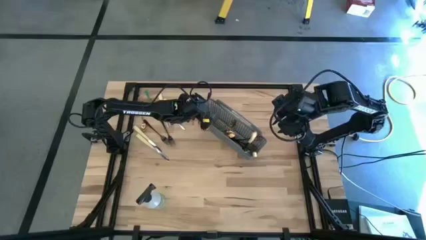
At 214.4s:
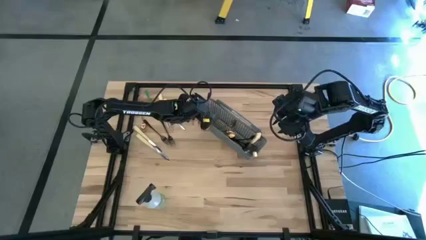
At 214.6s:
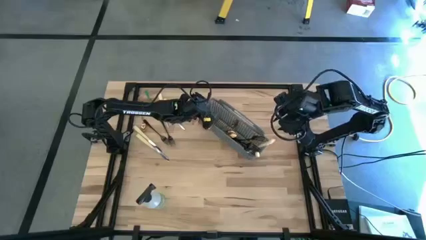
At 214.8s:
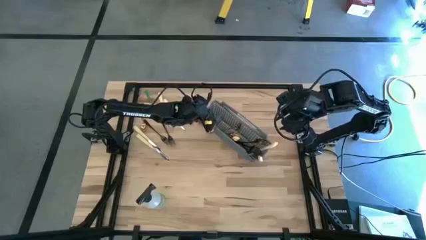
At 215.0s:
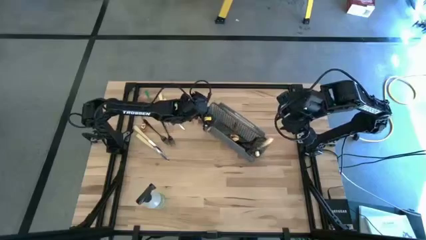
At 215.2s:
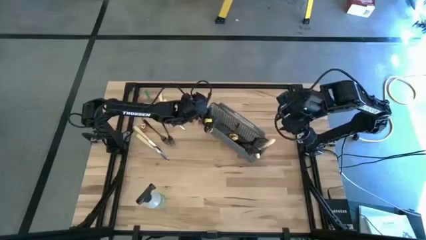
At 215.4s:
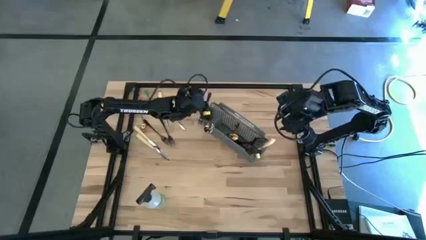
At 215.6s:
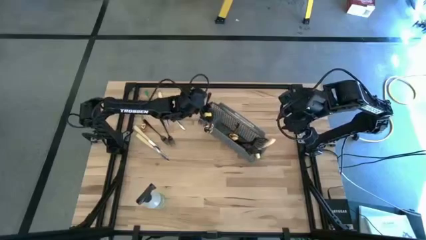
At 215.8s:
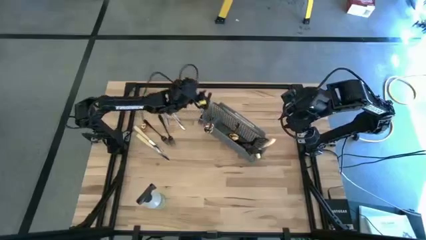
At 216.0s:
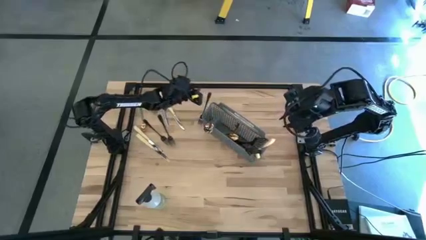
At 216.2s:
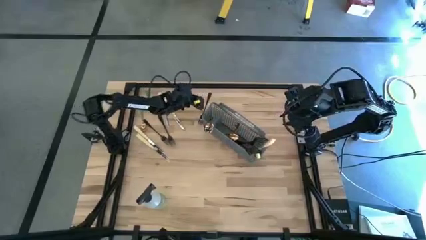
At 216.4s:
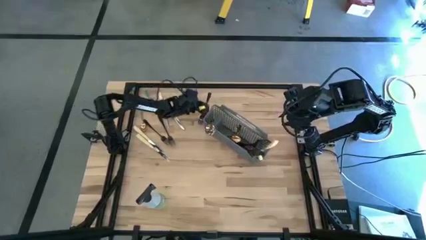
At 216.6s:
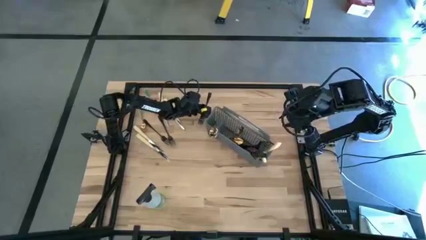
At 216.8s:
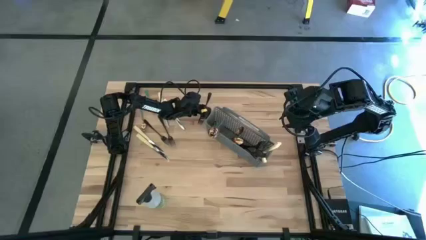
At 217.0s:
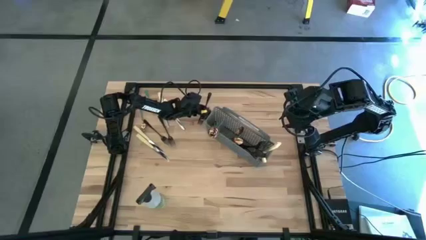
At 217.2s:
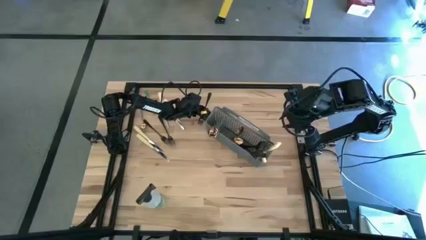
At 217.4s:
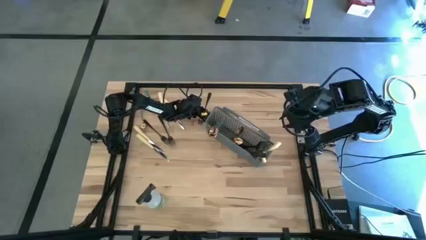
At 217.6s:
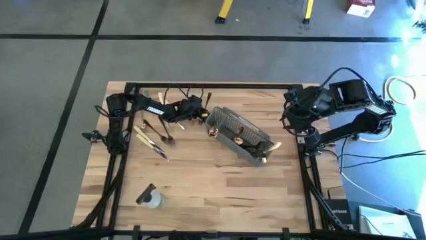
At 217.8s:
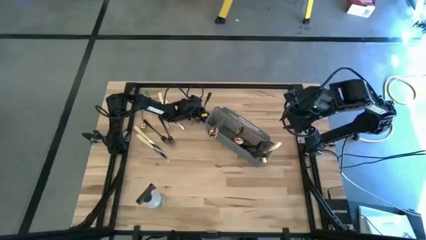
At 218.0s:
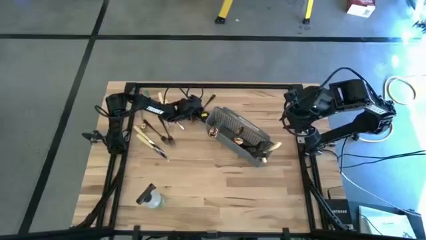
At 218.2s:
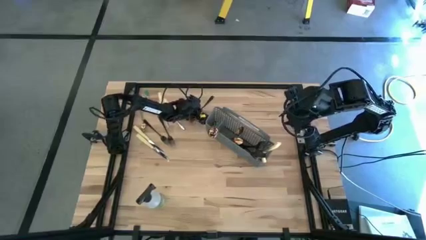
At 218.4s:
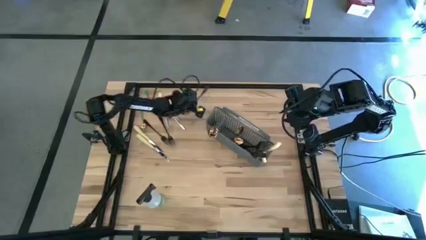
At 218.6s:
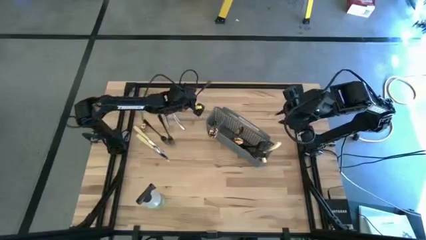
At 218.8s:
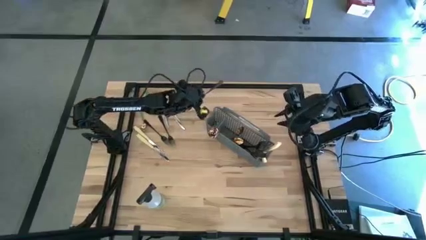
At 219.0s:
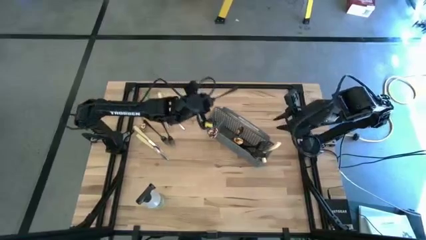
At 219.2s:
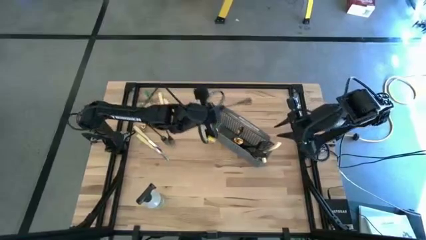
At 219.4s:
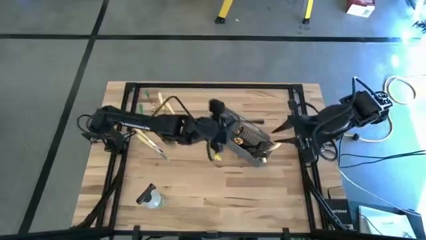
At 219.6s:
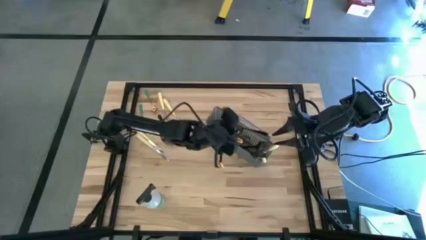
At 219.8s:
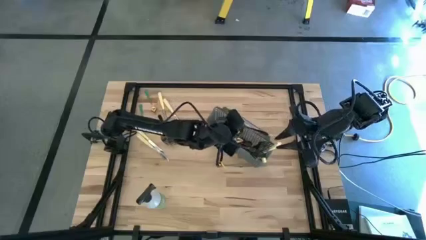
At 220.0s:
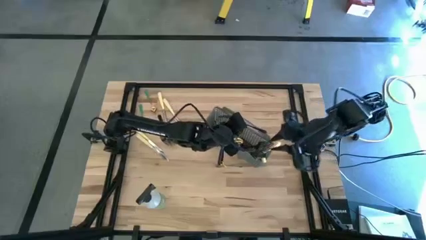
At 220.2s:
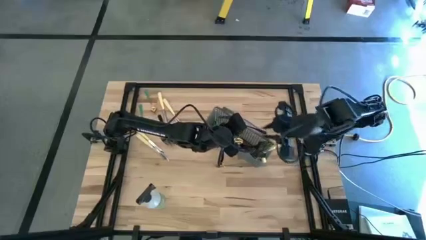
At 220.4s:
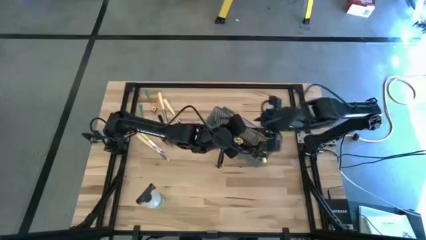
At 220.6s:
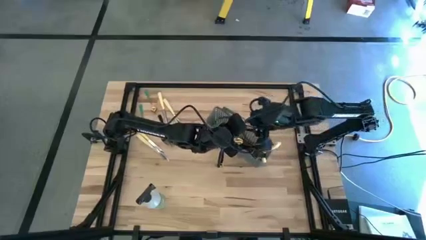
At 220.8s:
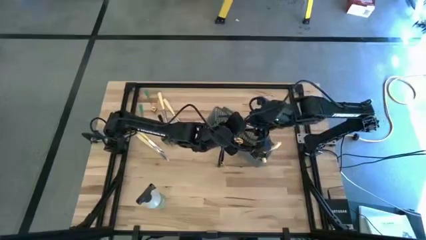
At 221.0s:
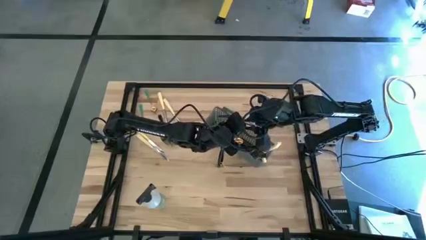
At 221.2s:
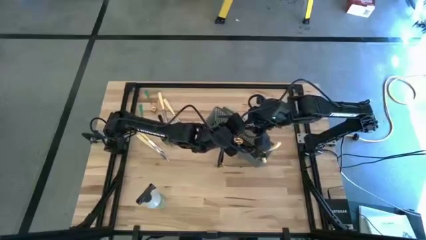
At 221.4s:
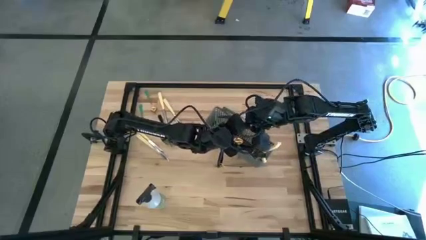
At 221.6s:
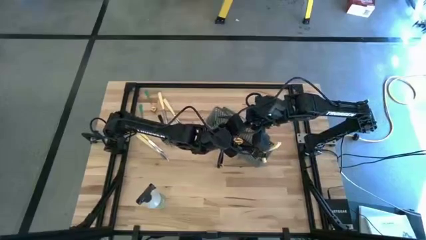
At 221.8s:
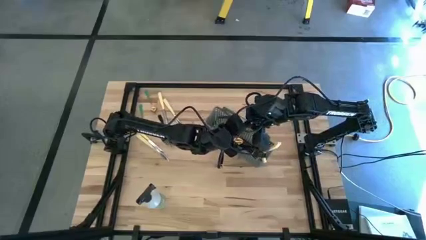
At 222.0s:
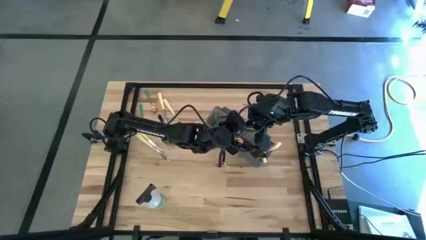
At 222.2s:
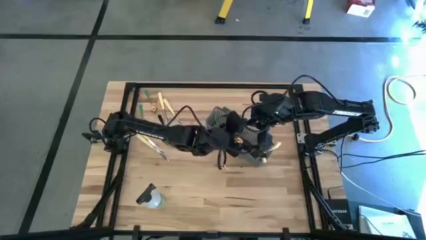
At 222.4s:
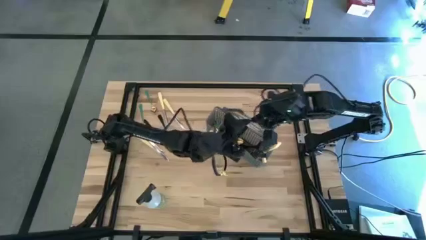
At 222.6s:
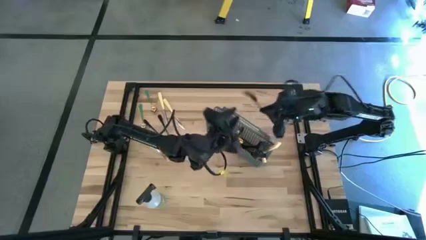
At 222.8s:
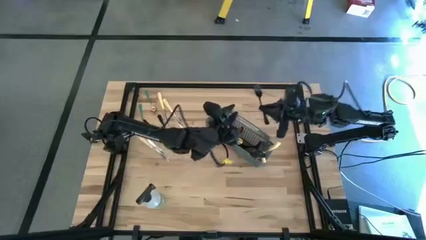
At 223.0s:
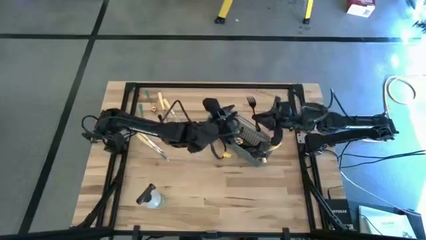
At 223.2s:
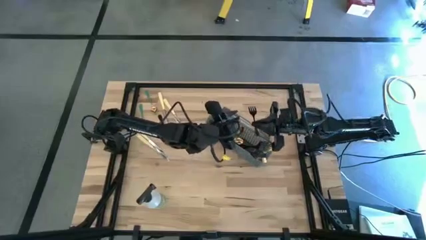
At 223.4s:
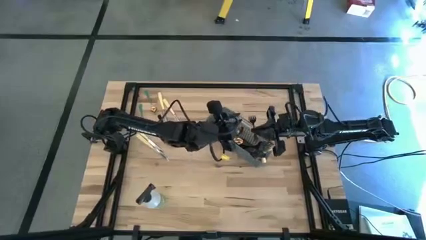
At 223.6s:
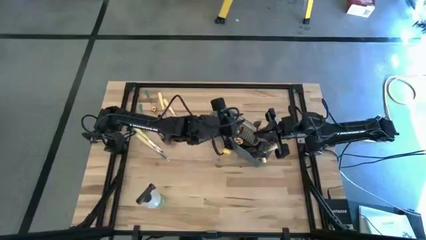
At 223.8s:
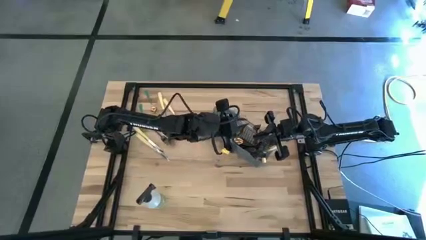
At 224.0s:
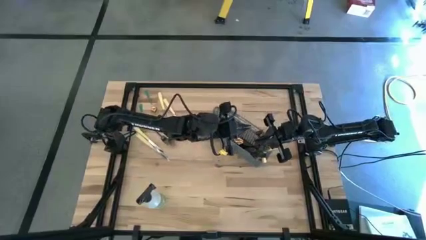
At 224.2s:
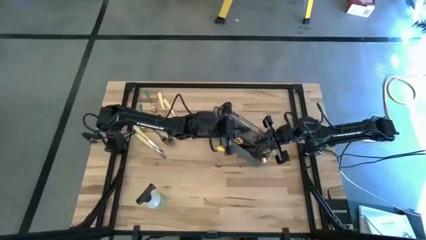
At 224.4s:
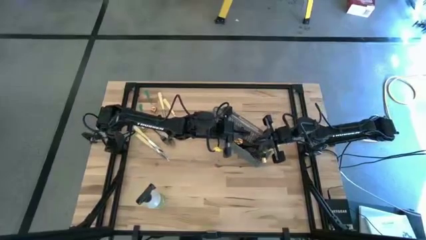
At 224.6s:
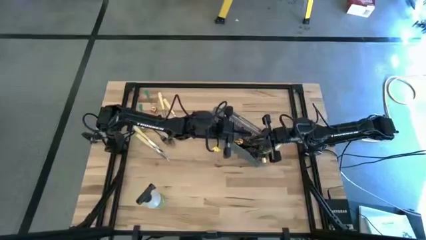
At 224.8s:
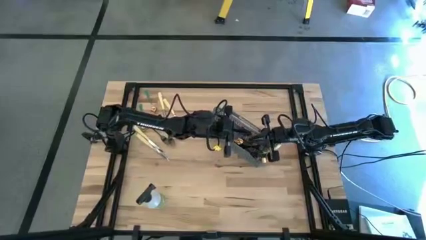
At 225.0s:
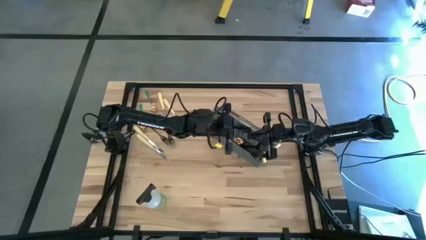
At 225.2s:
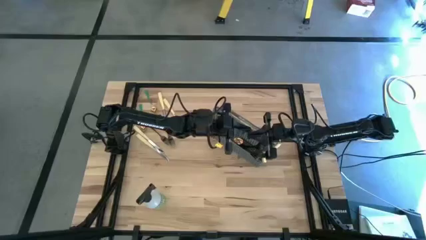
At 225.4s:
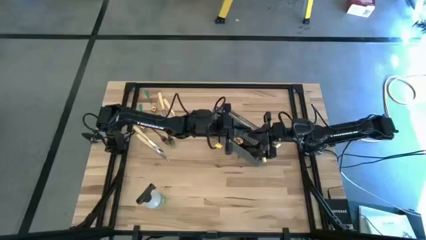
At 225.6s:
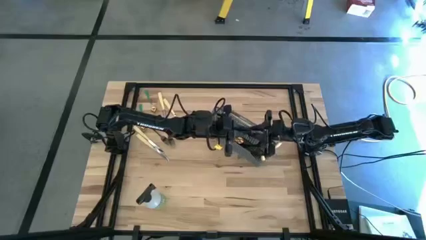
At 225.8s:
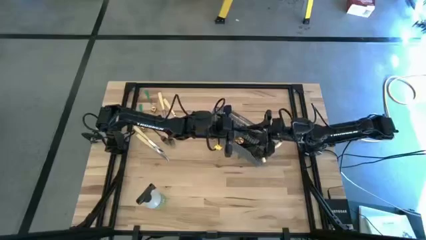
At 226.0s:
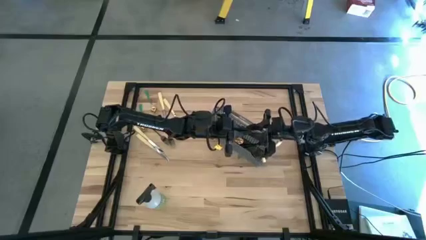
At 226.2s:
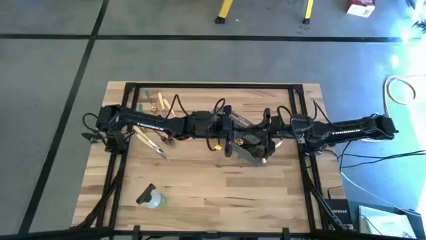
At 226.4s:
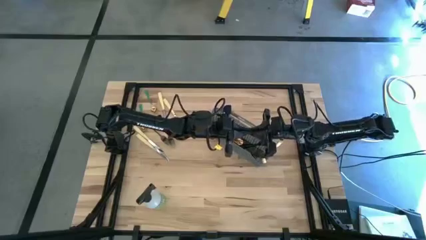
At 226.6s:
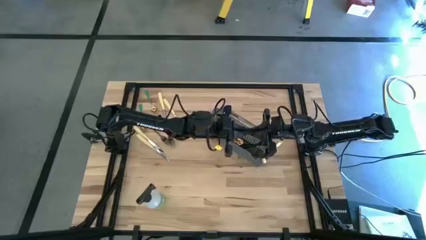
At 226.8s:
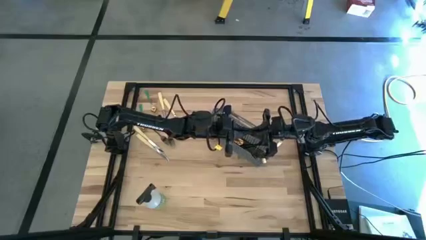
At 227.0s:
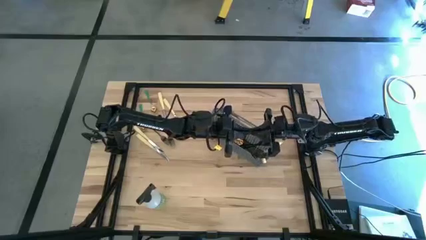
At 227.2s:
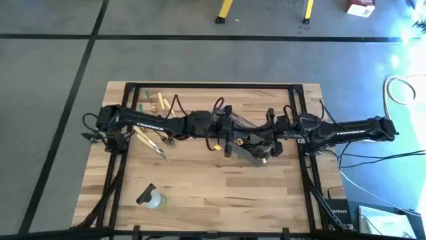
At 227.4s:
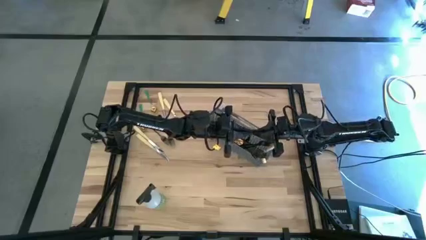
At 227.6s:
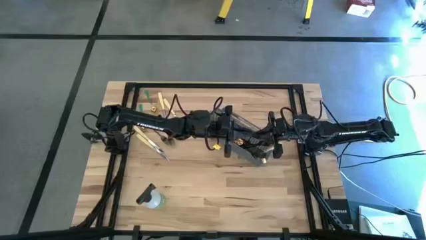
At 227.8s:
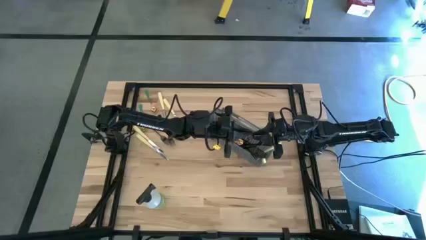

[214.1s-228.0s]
Task: Sort silverware
Put the black fork into the cutlery rack

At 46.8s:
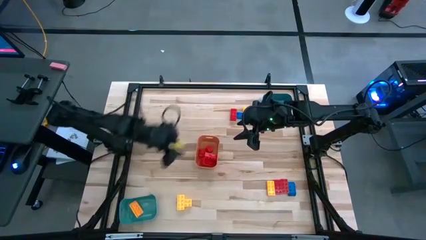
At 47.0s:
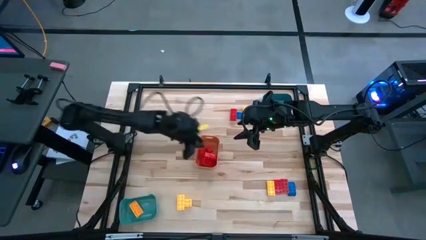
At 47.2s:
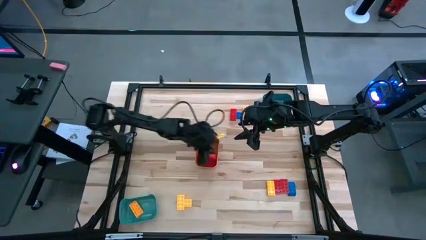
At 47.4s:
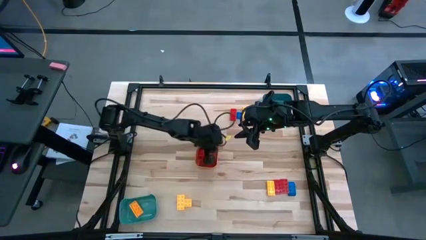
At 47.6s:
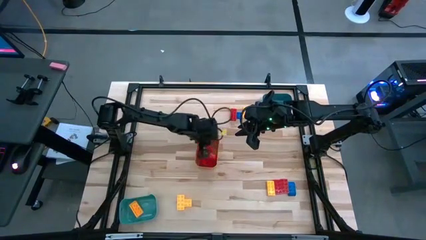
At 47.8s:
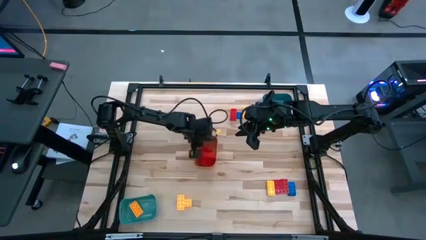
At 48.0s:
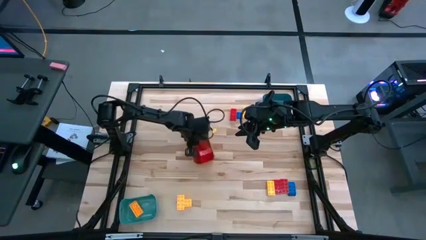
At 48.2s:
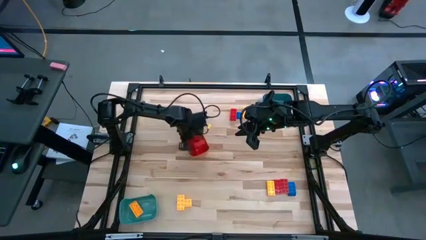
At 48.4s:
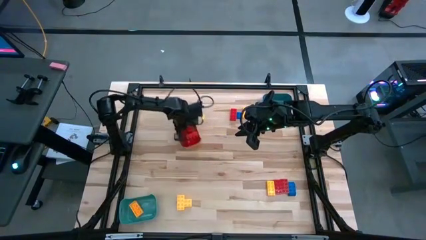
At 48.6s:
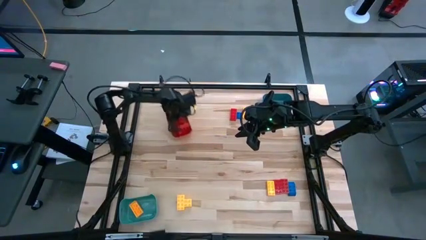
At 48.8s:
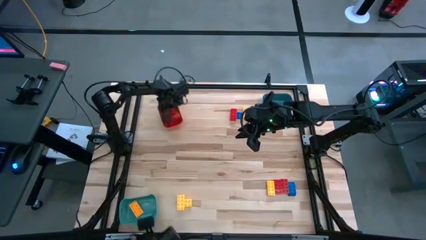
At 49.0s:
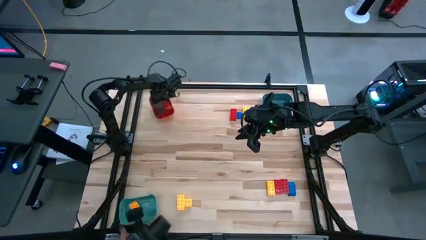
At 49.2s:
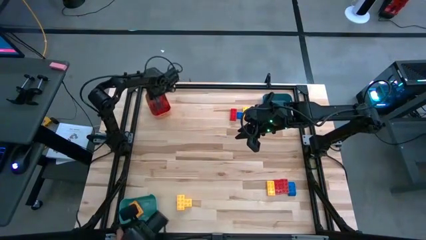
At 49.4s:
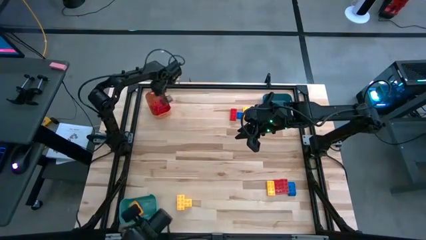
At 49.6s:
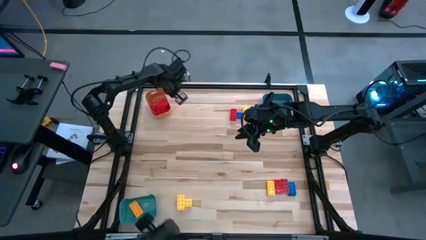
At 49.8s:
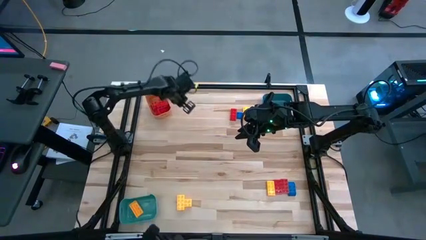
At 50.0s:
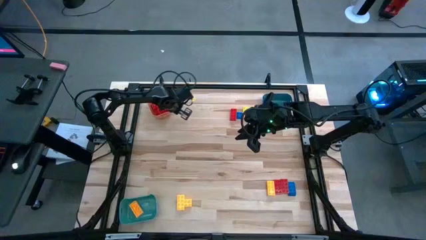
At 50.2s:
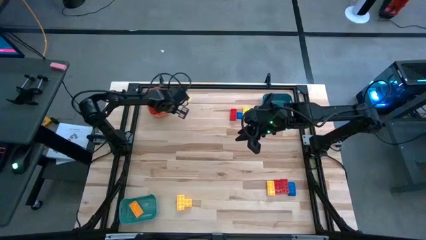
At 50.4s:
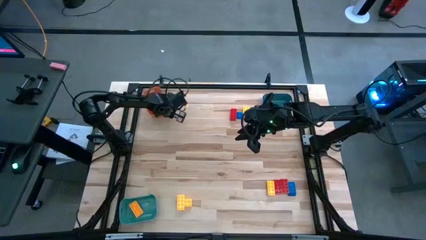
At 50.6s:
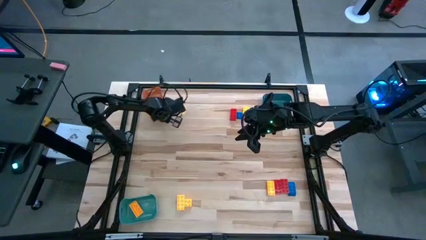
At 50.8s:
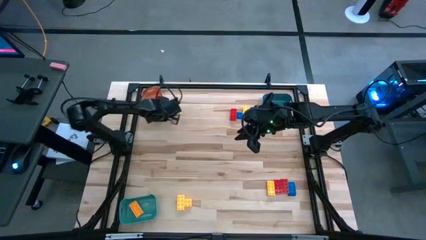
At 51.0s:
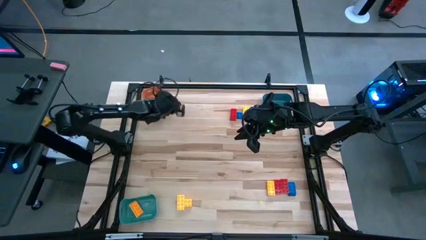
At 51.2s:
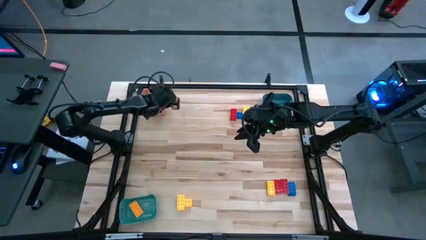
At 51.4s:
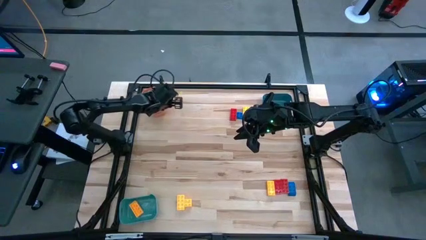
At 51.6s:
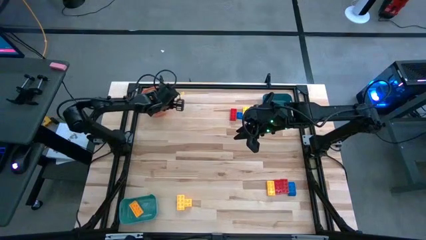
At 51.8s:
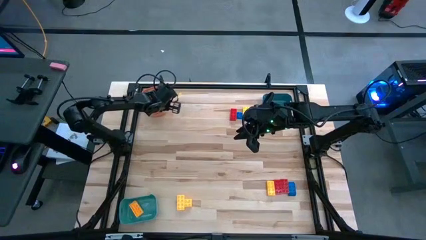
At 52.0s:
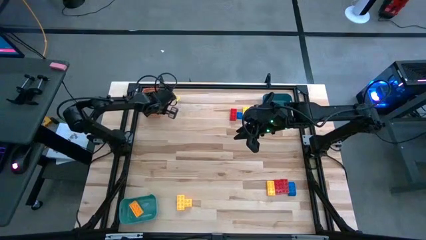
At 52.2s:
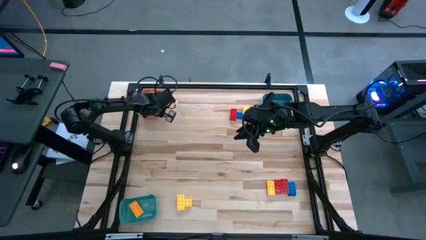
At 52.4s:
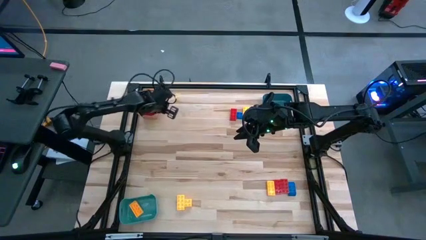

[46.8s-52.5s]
Task: Sort blocks
Move the orange bin from the center to the top left side of the table
